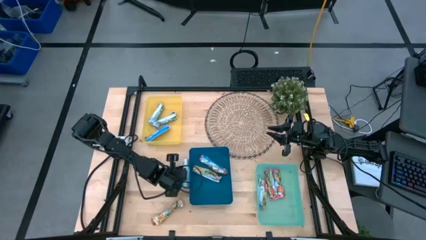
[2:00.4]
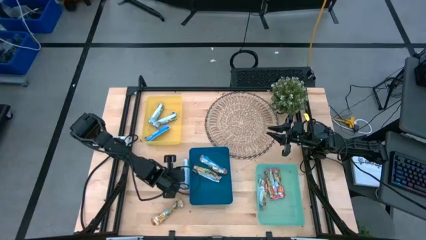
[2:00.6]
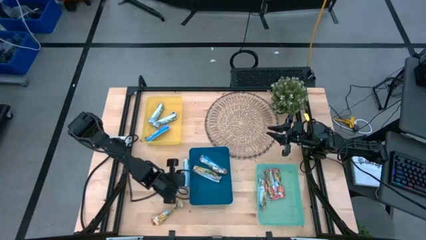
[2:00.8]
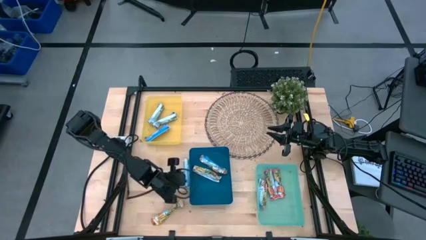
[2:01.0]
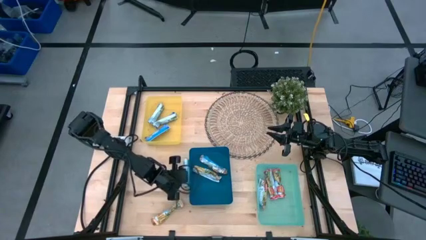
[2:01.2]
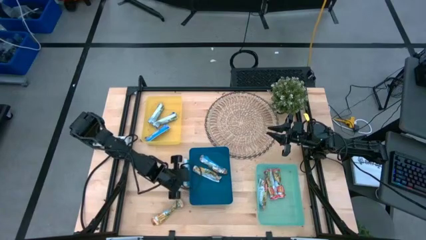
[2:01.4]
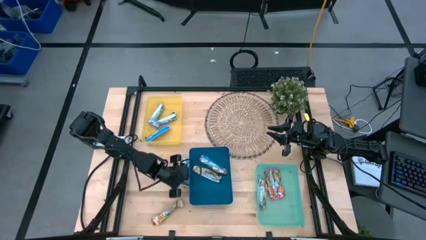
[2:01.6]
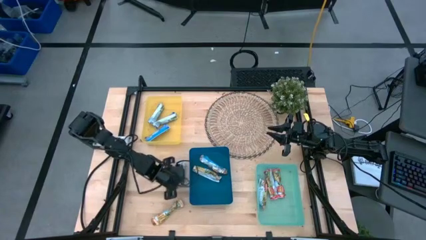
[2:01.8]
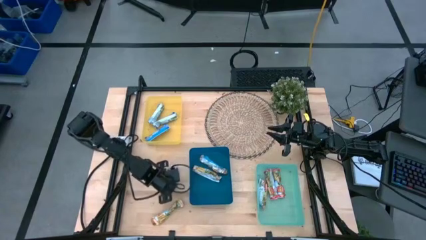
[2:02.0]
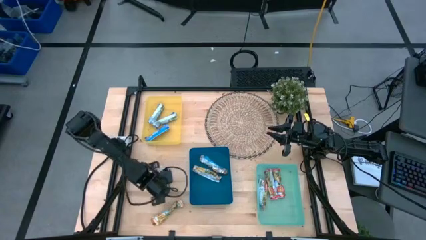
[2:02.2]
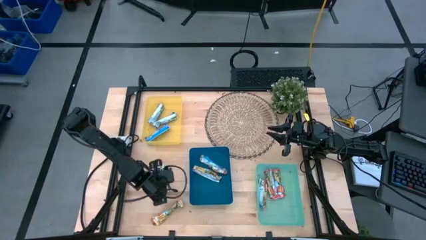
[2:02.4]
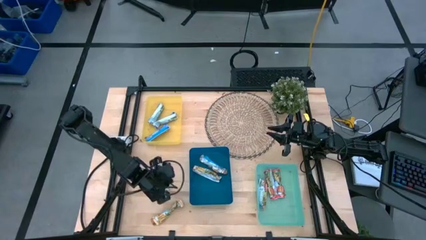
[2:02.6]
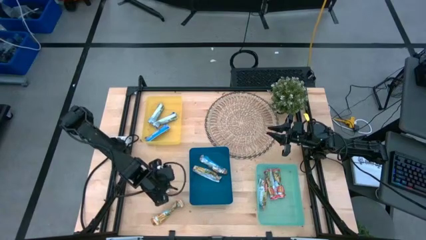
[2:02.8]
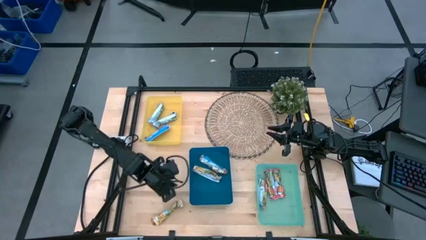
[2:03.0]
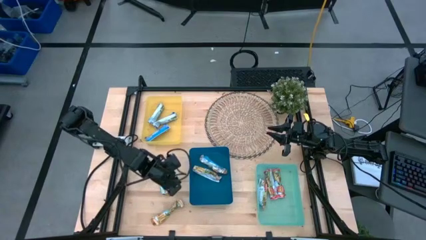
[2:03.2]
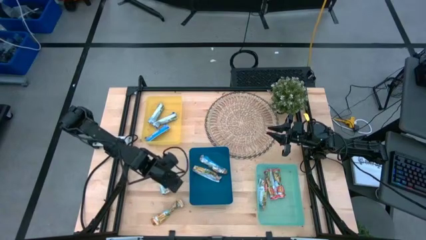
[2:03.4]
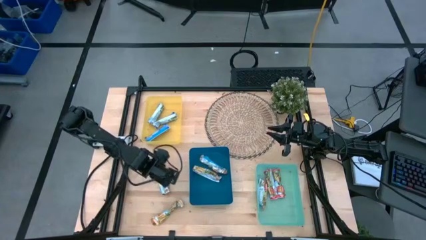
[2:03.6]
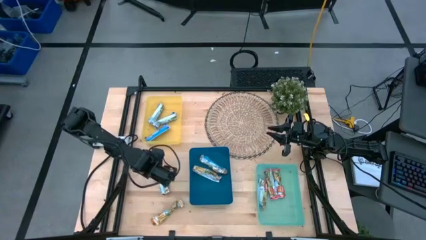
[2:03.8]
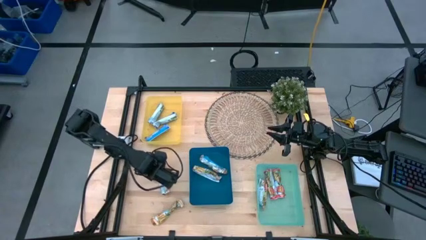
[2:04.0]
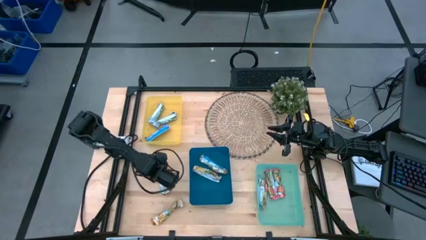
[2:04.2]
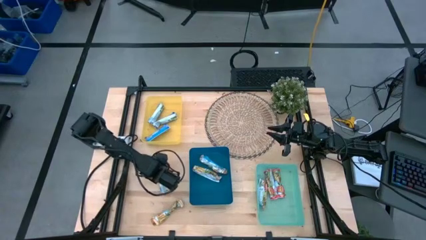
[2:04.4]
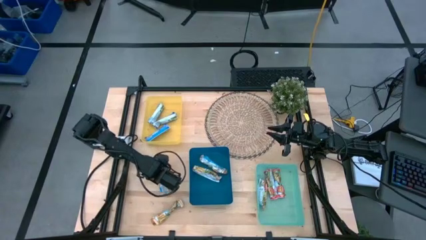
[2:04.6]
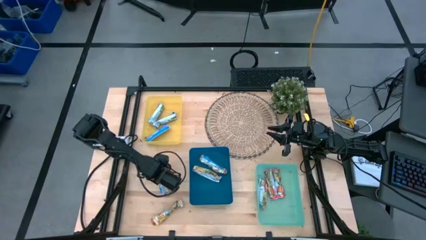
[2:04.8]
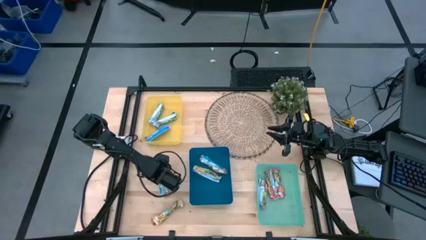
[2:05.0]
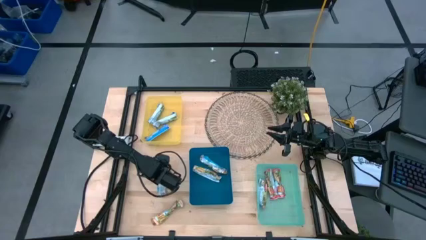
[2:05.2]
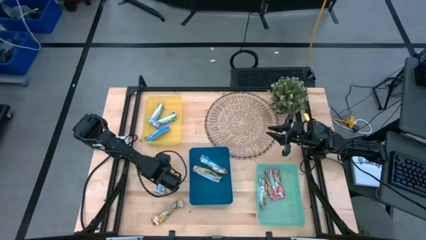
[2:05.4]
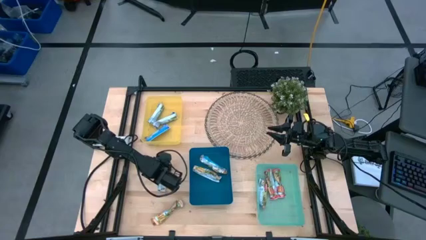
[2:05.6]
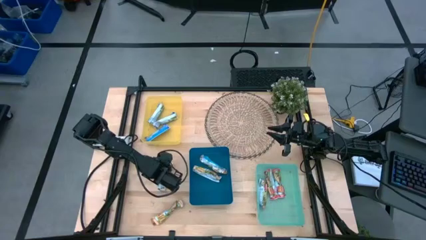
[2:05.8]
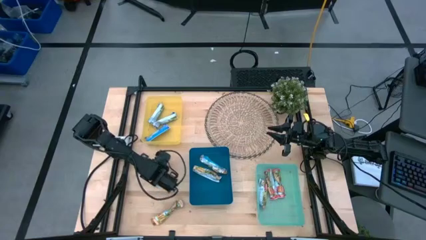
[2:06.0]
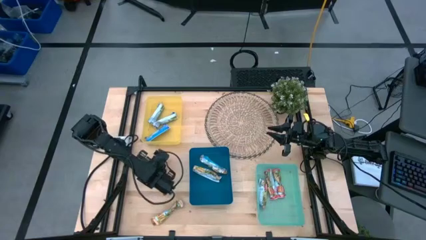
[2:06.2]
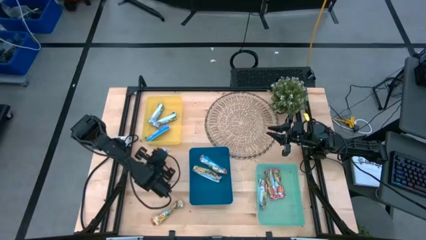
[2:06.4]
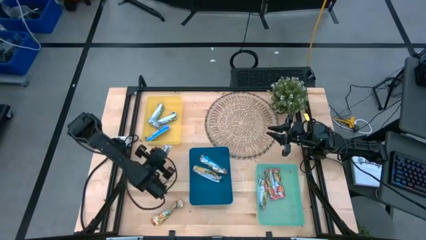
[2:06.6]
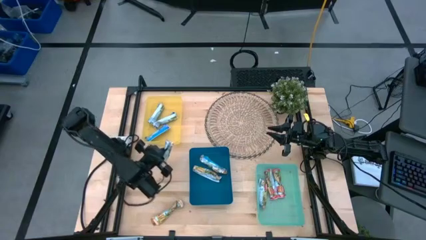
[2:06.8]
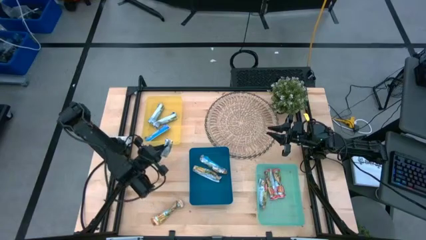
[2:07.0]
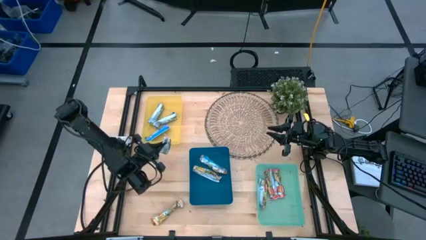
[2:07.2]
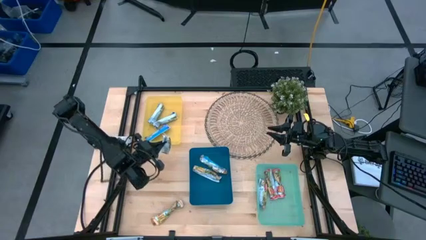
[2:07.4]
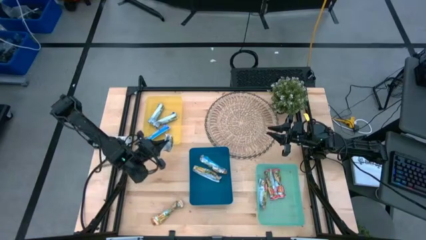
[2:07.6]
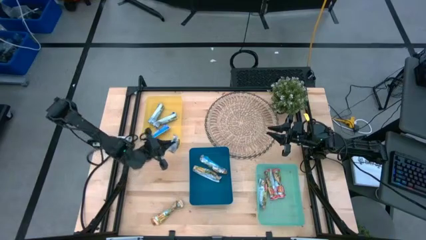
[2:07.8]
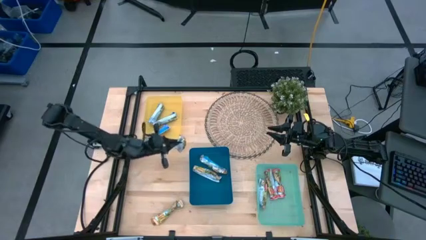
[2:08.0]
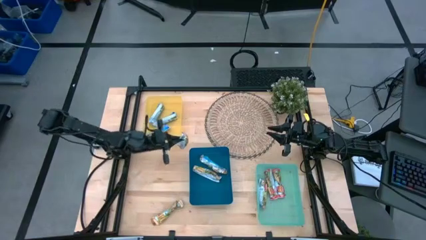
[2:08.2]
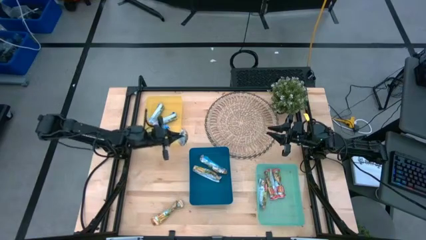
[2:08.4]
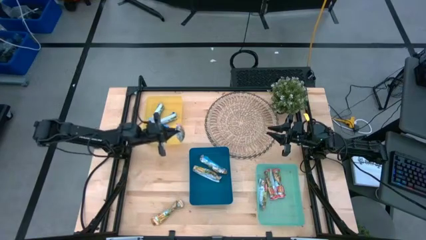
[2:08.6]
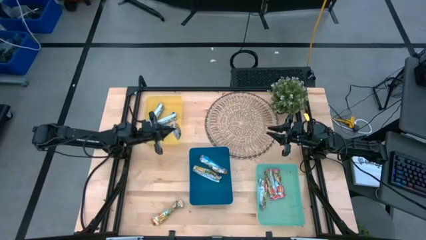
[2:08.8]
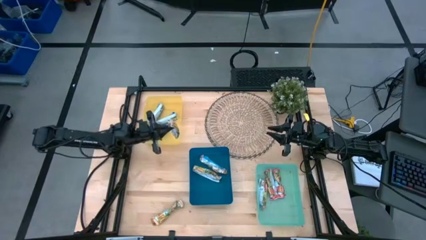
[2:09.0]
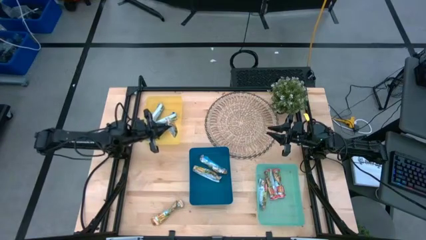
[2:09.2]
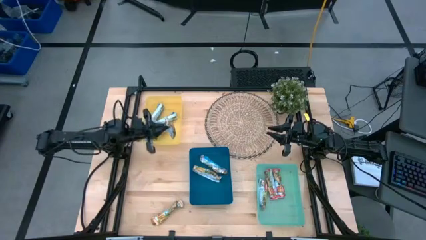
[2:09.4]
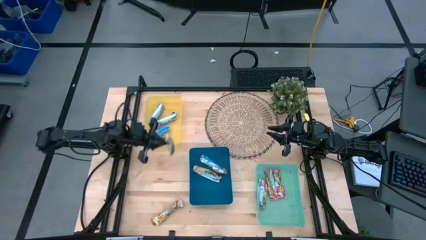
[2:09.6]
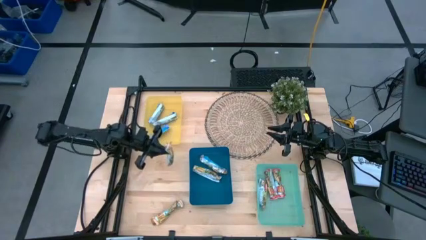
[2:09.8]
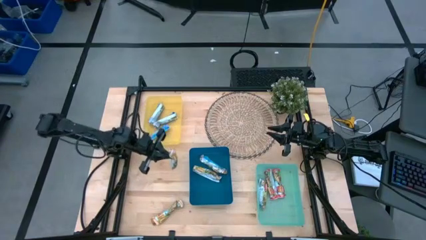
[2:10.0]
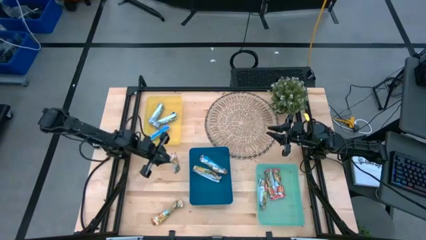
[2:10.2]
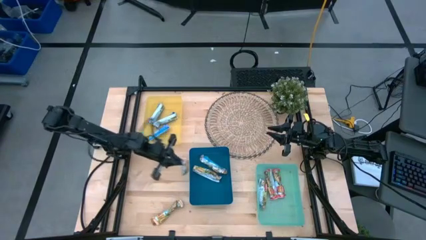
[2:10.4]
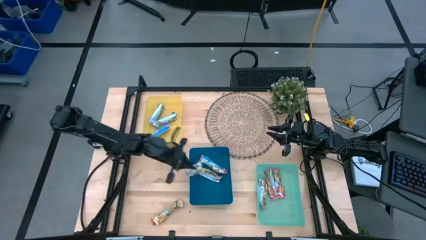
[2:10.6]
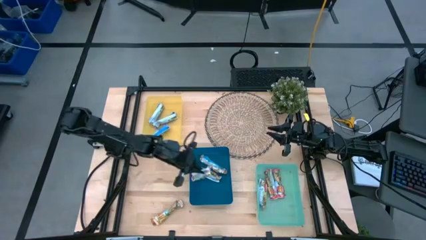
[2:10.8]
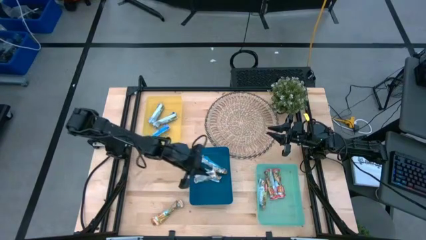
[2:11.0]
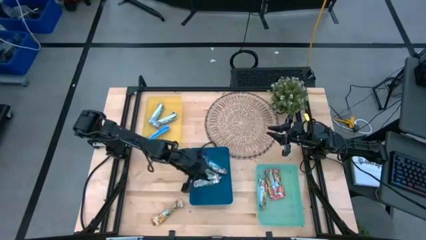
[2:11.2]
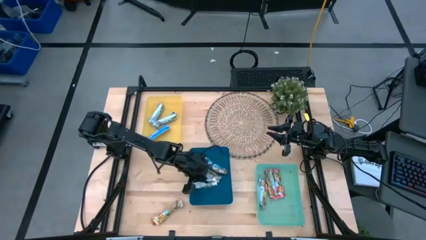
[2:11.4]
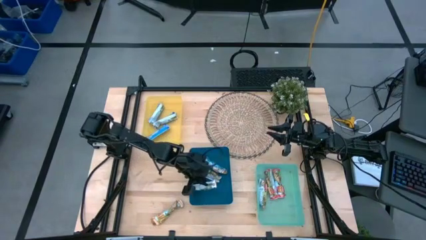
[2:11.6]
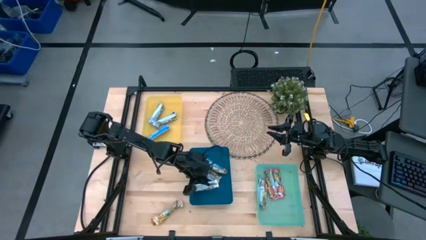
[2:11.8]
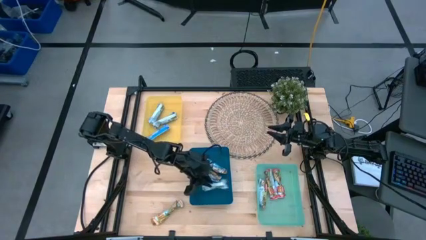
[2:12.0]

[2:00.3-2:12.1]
Task: Pick and place Granola Bars by type
Put the yellow granola bar into the blue bin

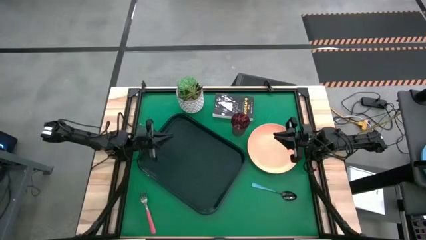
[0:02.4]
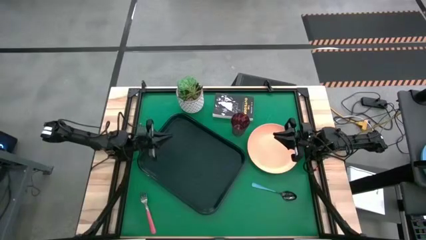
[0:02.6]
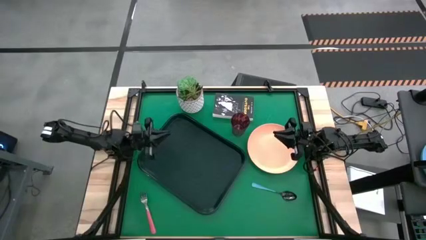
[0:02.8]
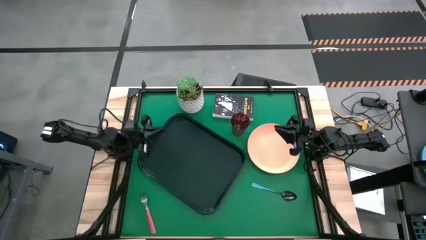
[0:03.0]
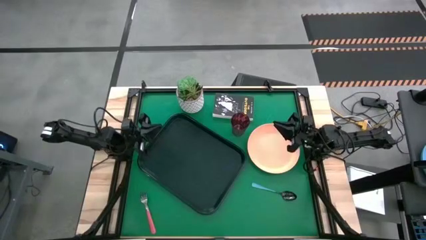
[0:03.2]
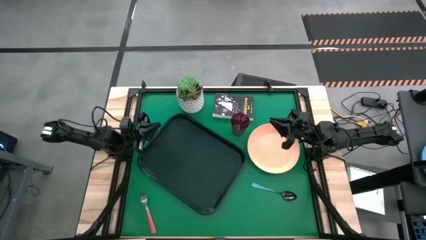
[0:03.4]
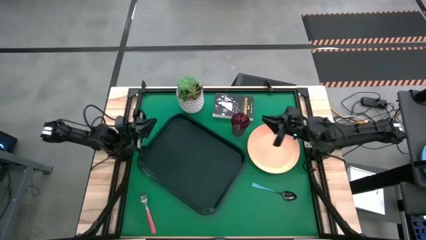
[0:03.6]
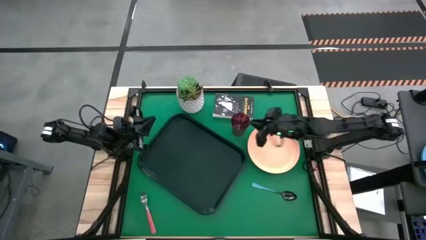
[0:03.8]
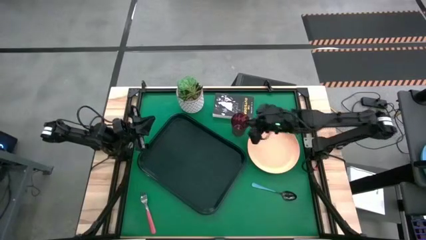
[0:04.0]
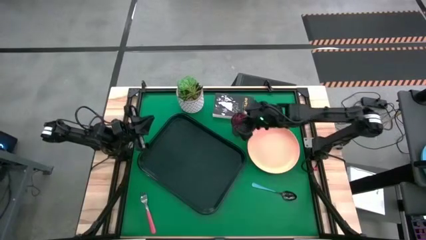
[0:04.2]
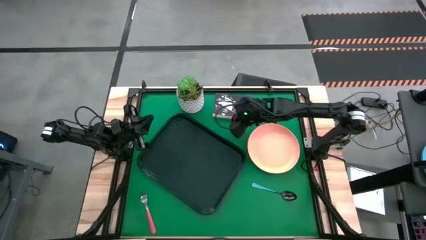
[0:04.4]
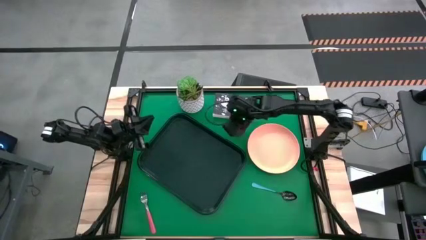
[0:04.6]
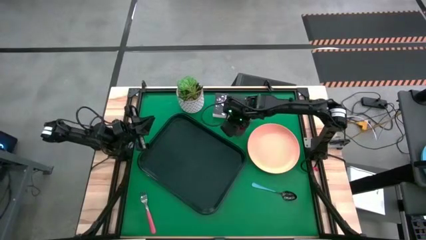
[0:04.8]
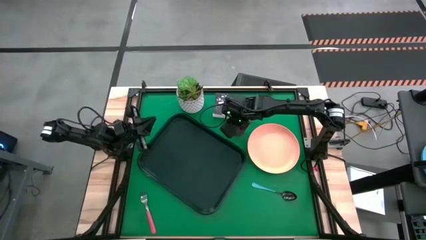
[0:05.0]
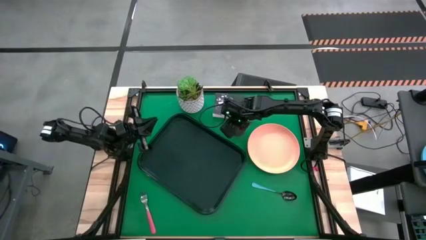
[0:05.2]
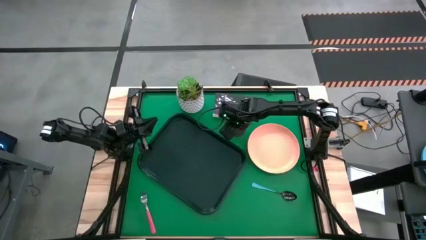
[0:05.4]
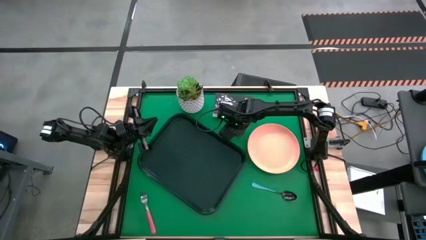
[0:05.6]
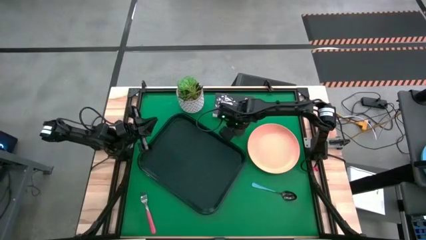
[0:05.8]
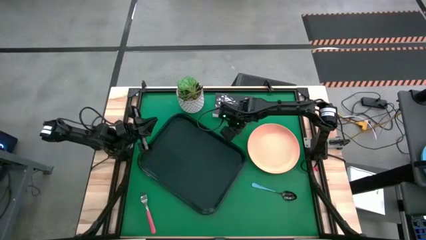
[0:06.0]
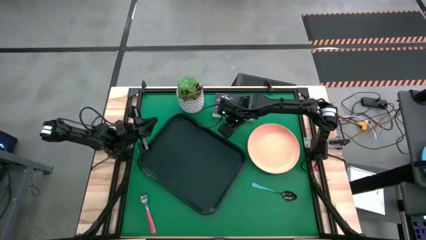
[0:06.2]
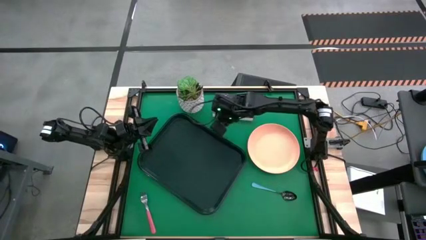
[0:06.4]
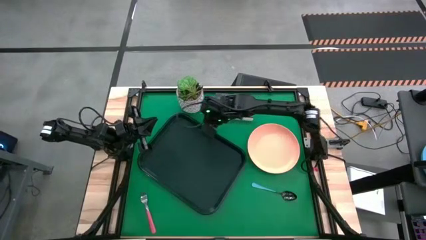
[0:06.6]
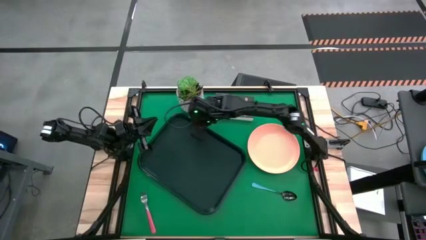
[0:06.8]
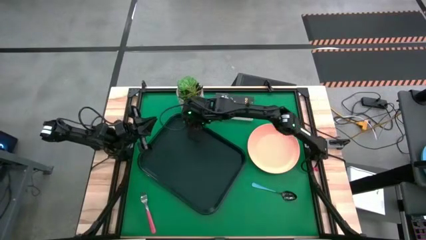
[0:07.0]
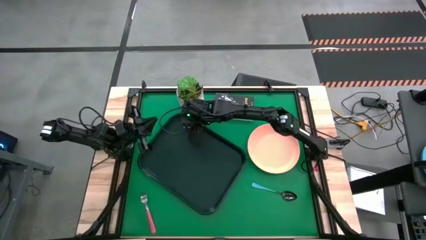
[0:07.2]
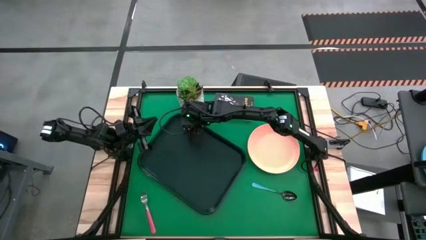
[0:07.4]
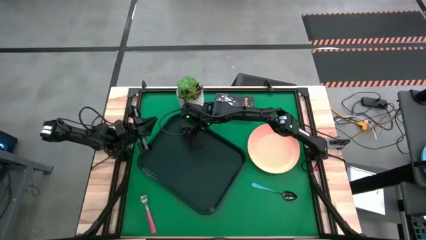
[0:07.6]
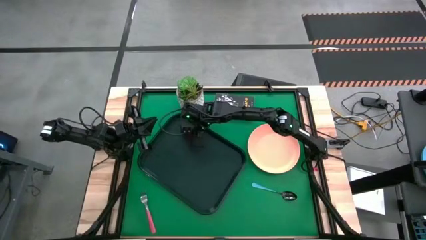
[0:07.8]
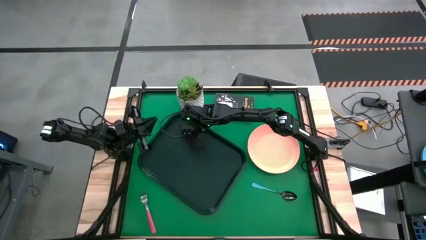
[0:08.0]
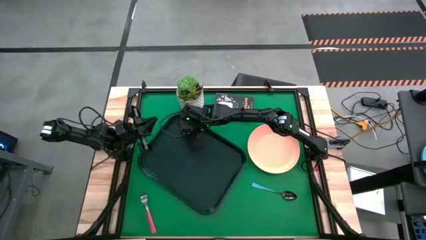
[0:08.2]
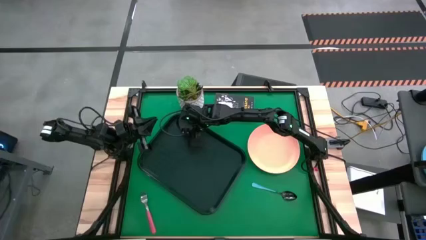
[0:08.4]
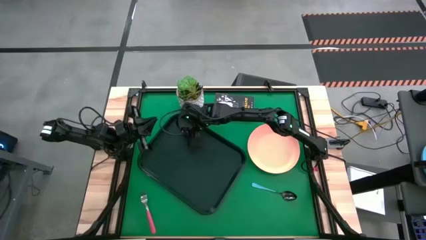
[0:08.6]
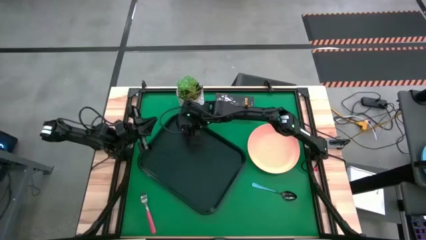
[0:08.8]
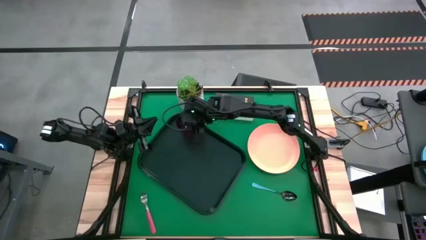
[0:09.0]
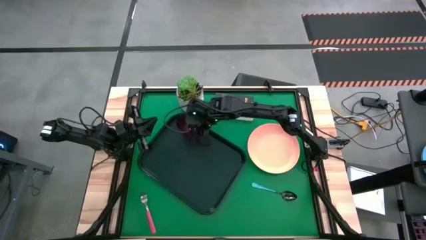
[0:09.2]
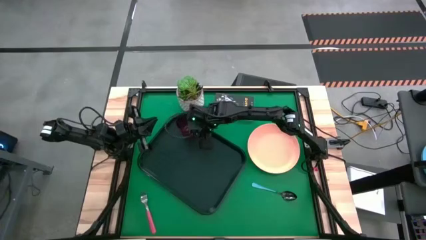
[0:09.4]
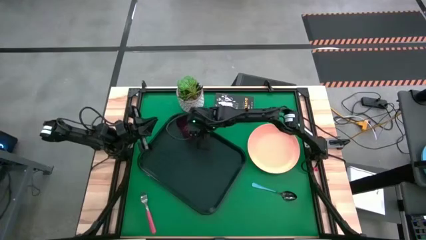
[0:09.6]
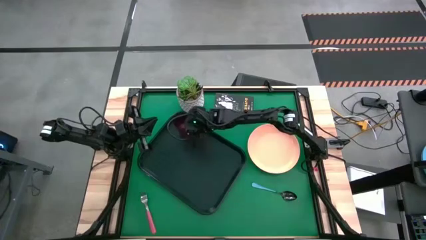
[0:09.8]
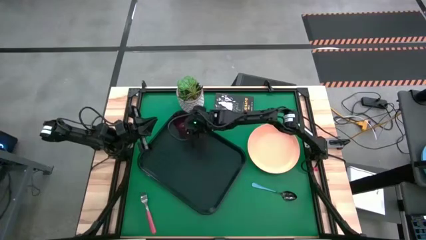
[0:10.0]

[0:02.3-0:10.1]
Task: Pick and place plate/cup/fork/spoon on tray
Put the red cup on the top left of the black tray
